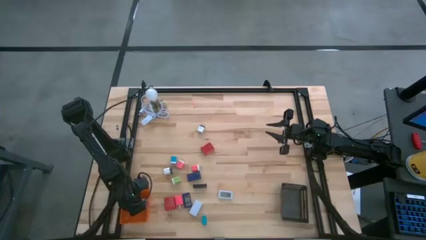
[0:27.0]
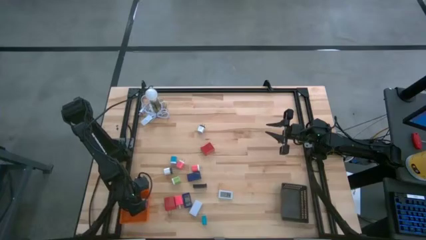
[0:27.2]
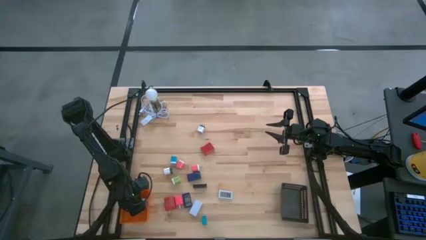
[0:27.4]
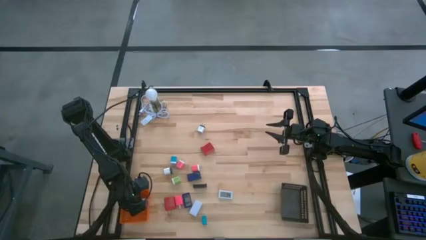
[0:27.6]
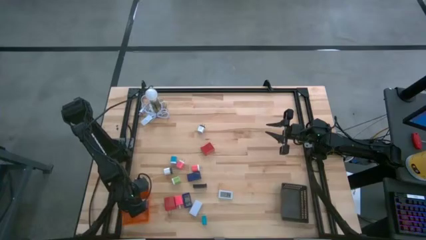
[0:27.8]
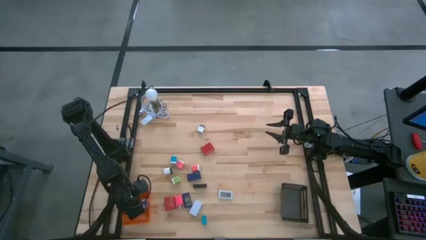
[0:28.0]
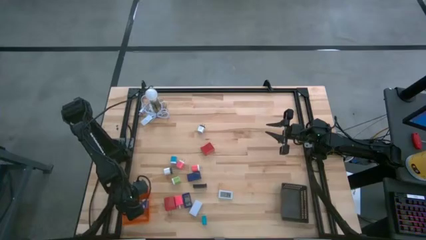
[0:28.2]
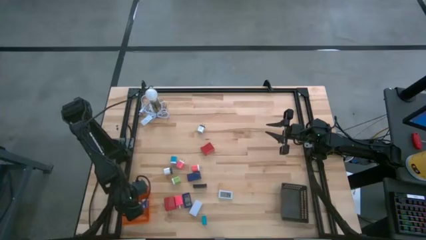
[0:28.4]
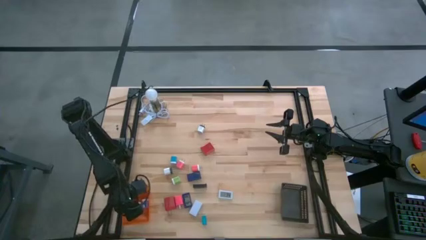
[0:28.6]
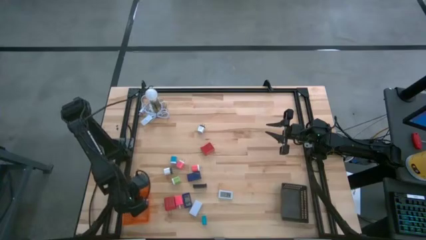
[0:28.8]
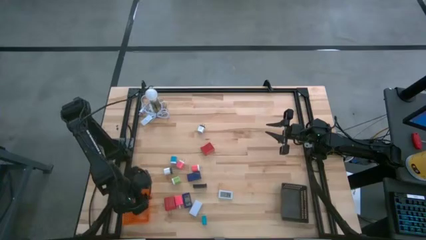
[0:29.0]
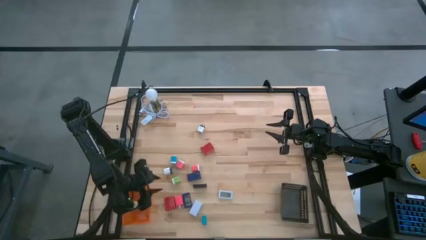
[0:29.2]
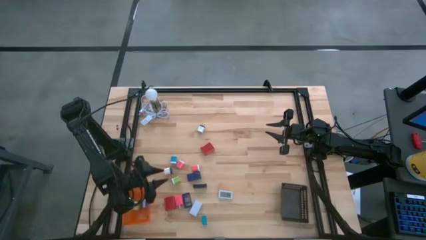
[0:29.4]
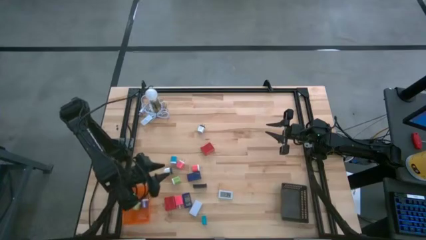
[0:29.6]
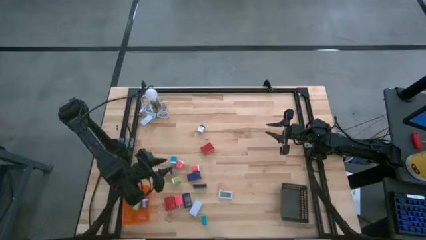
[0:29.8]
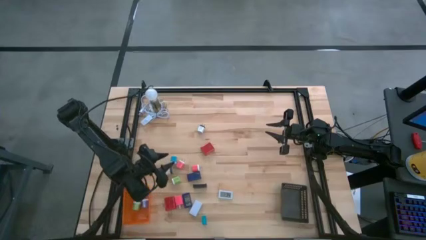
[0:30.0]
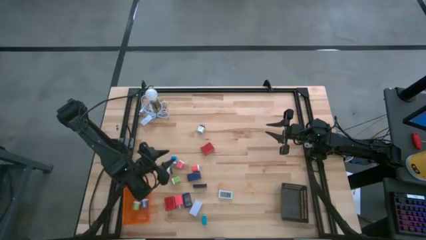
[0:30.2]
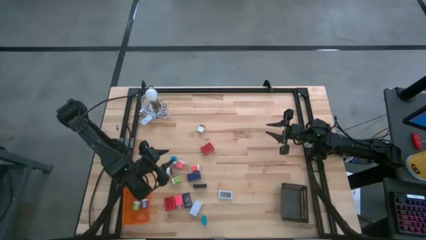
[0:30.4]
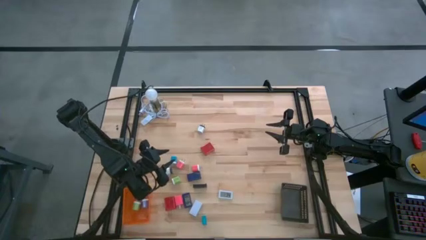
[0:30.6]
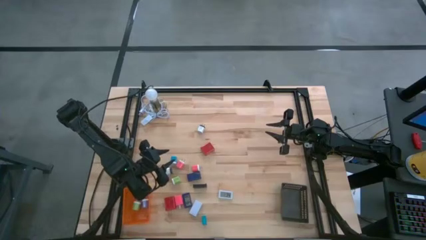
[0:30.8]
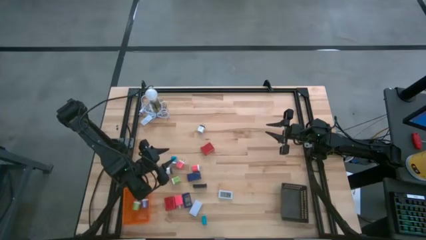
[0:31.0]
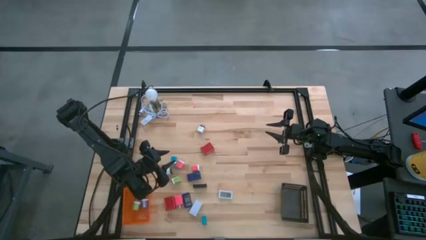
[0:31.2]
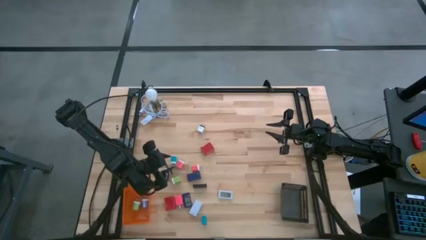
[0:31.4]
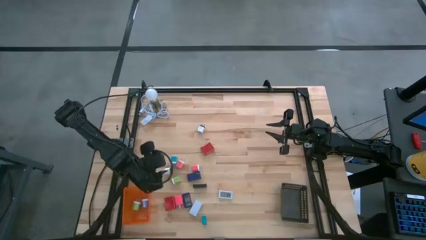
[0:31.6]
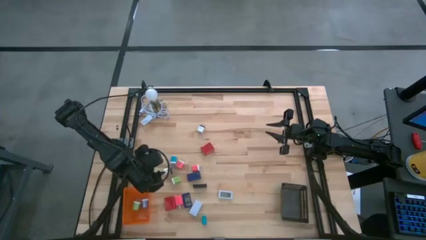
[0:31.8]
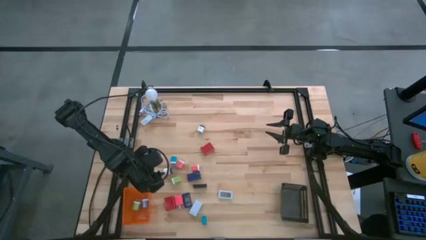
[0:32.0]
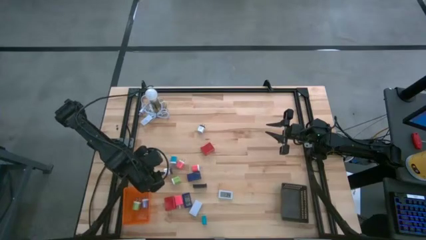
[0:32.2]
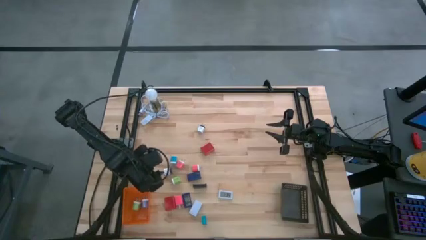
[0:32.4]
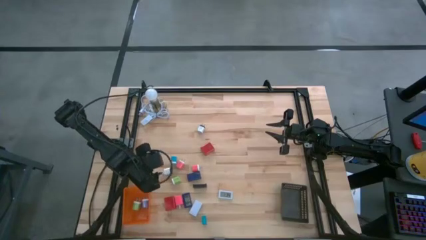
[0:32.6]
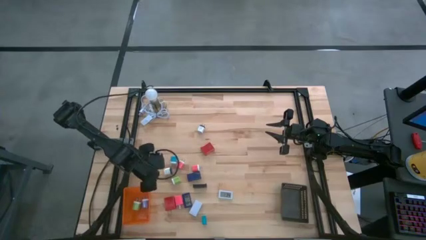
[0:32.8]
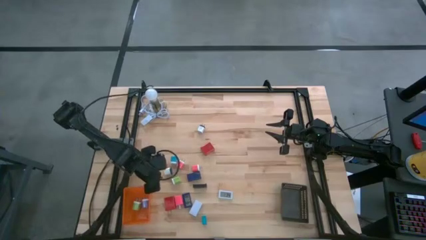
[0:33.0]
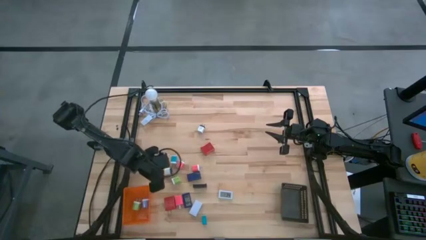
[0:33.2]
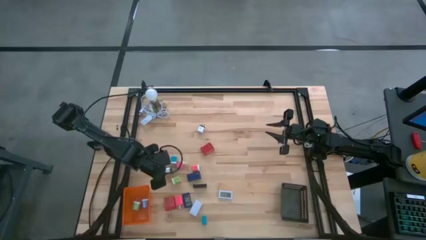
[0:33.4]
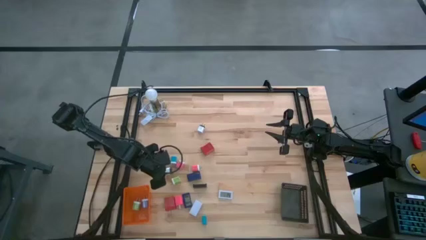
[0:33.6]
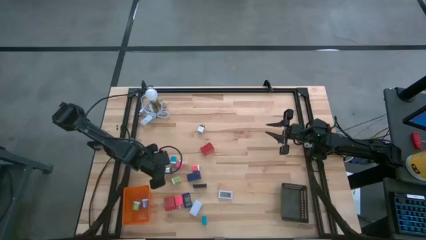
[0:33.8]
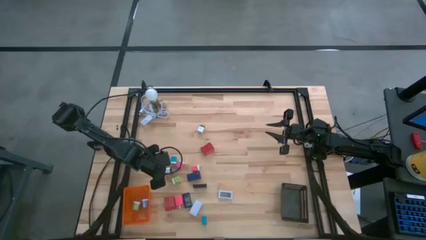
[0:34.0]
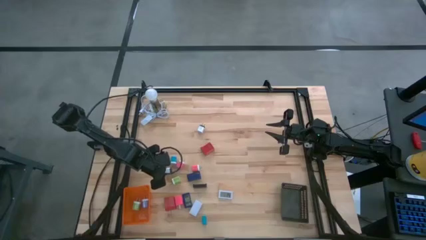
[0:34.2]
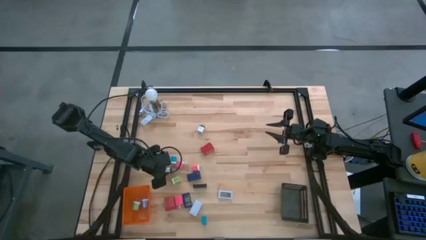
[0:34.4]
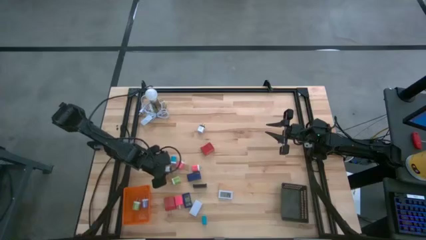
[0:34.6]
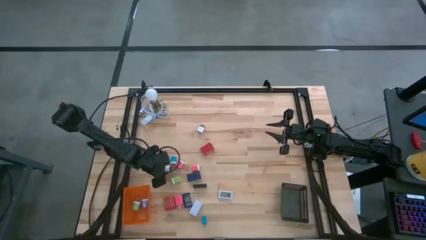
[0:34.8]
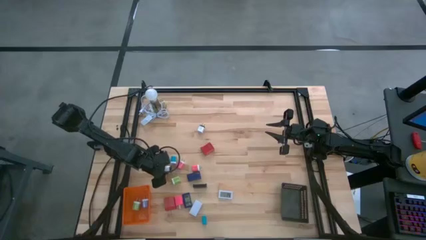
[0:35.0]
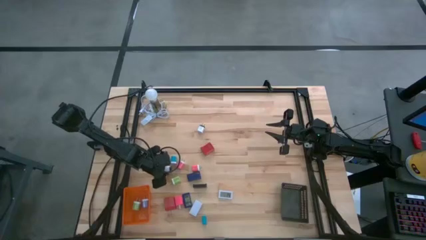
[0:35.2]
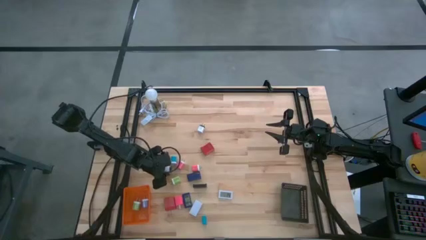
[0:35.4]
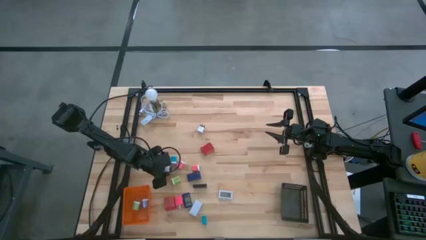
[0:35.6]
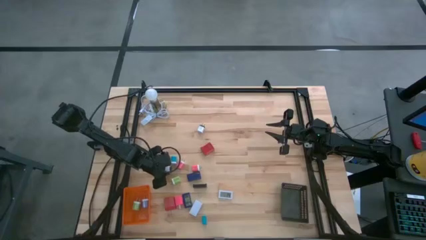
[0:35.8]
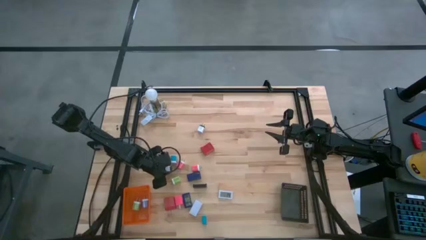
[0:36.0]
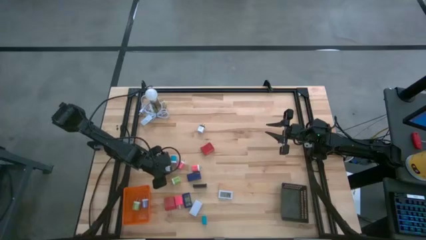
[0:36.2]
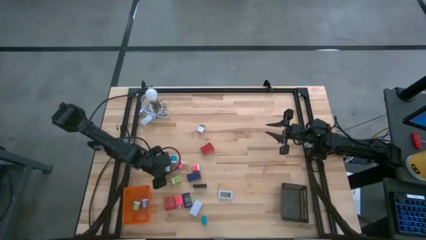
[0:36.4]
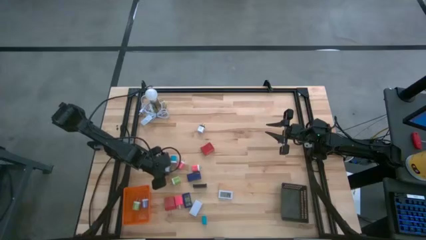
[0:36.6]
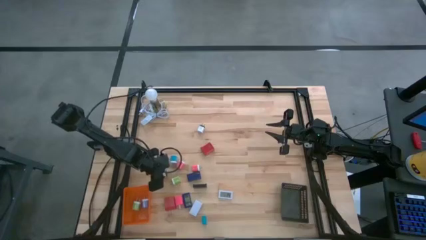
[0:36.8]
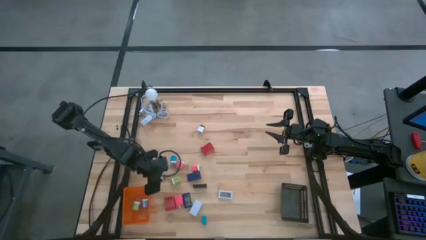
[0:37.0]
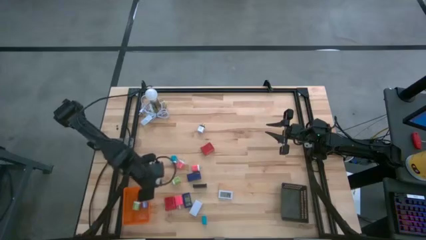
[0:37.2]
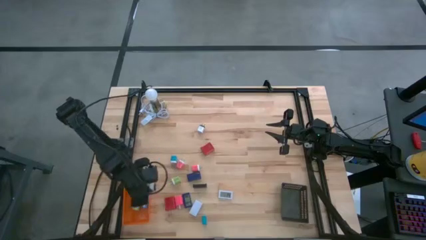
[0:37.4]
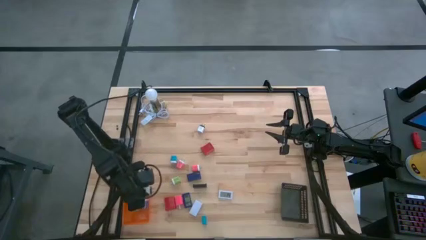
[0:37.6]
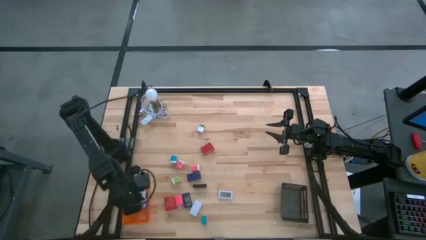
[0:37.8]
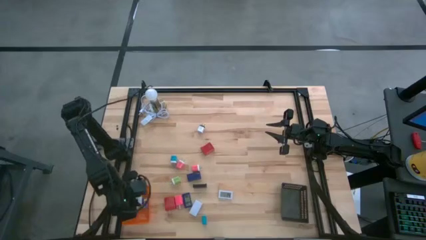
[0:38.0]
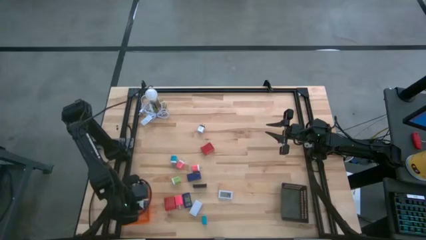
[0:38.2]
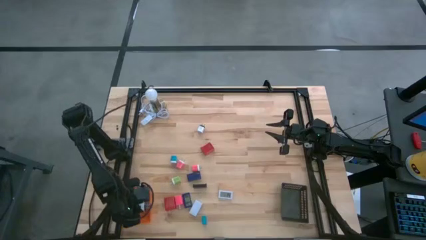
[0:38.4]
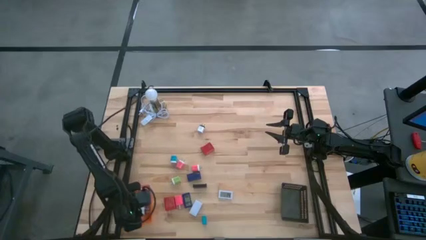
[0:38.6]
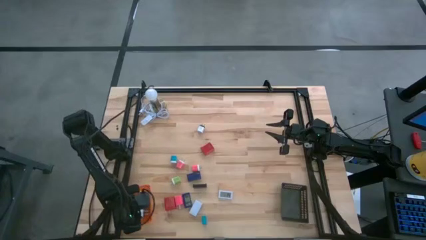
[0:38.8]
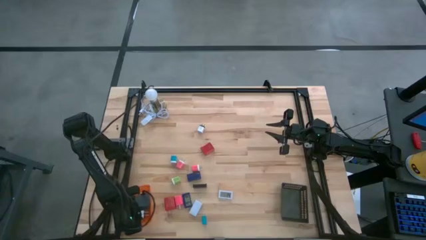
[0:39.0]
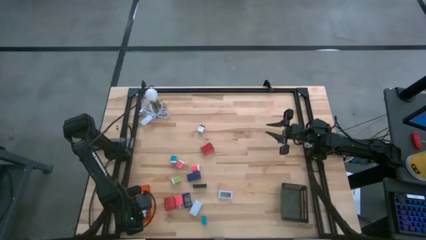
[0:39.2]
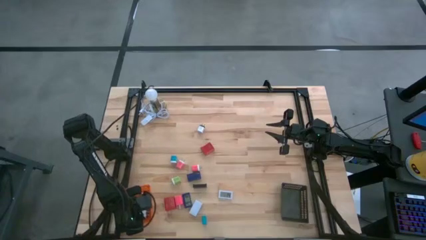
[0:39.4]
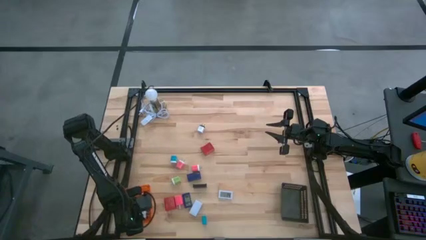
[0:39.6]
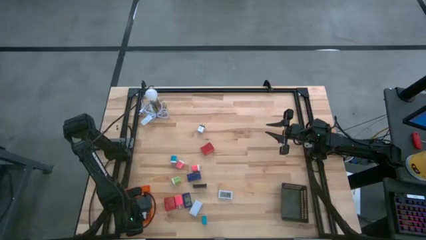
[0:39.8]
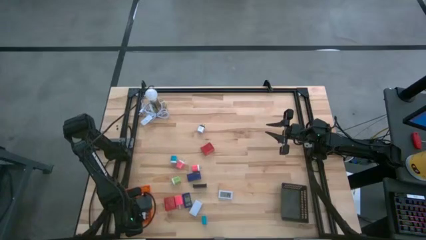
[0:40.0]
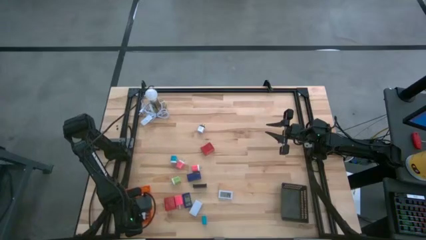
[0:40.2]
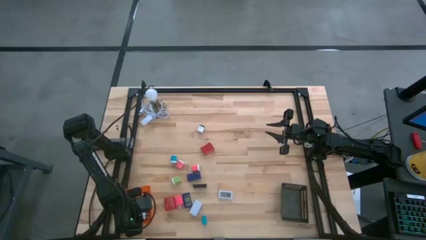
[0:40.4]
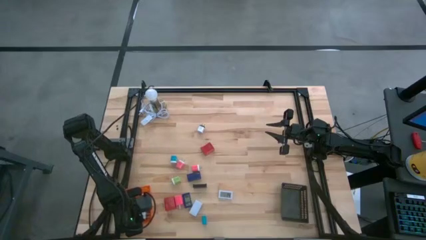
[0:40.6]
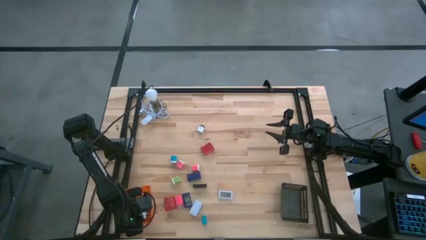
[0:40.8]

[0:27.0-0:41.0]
Task: Pick & Place Office items
Put the bottom white charger adapter into the orange bin
